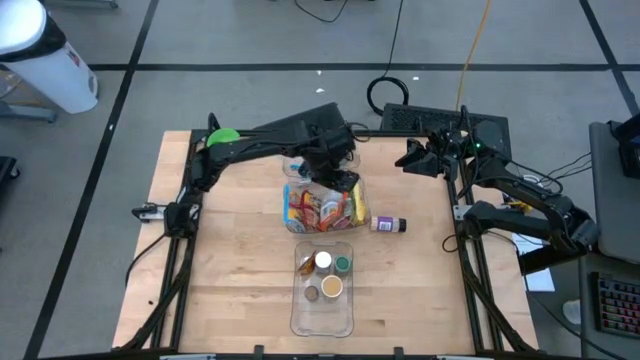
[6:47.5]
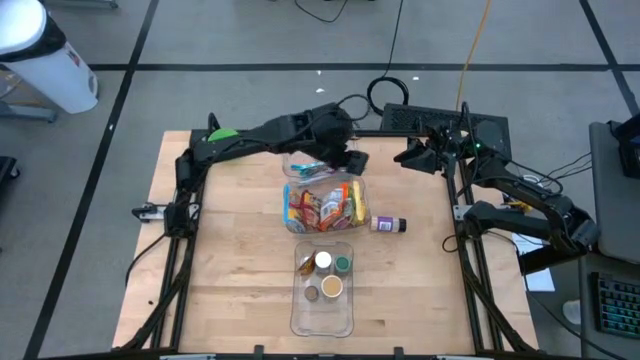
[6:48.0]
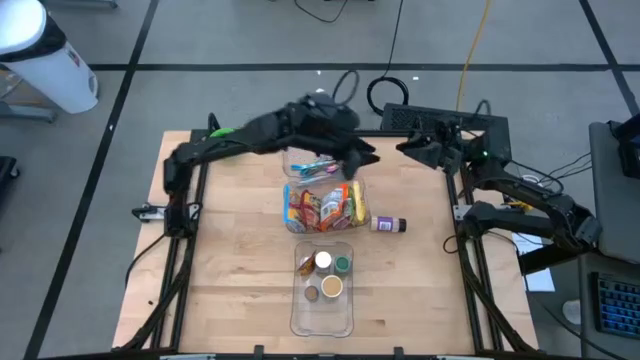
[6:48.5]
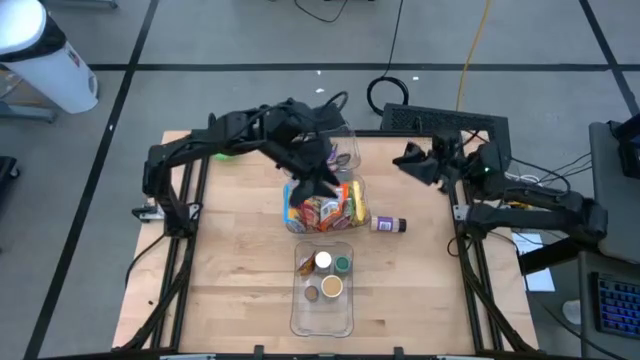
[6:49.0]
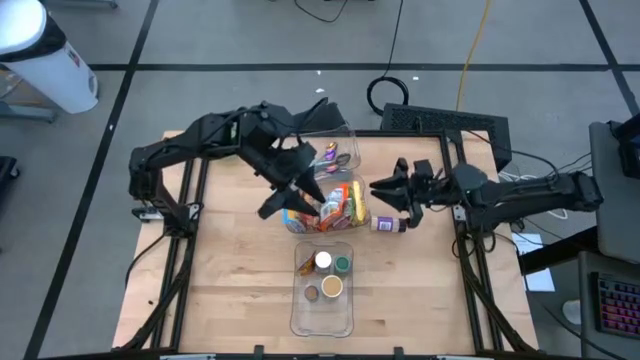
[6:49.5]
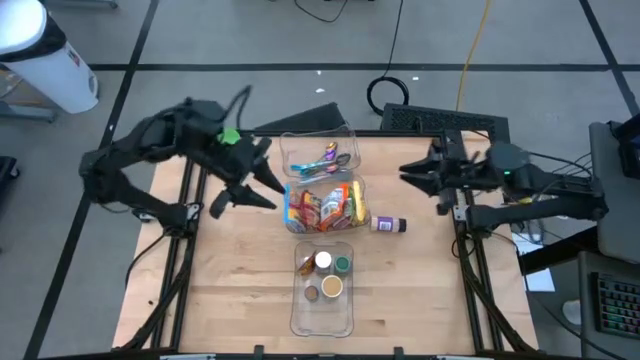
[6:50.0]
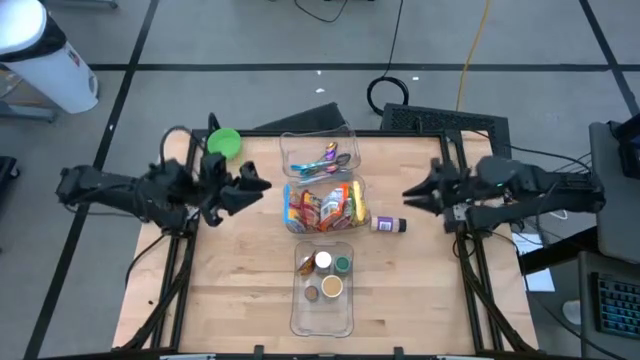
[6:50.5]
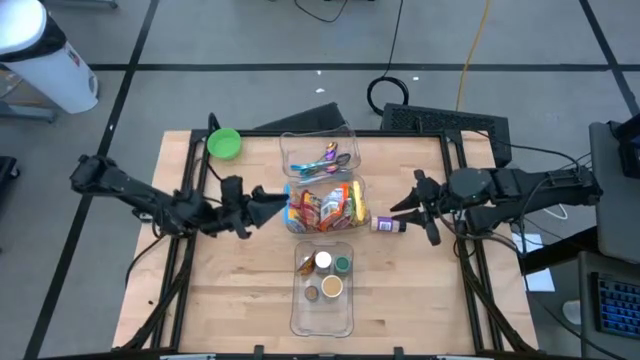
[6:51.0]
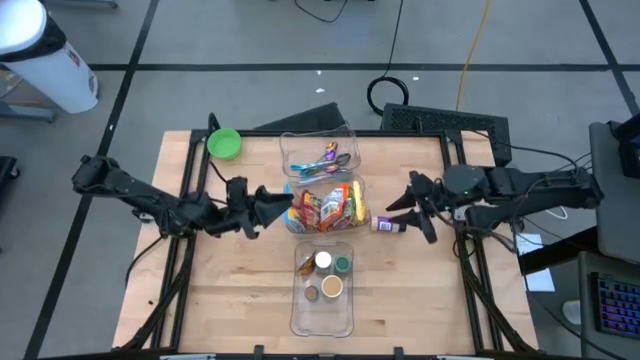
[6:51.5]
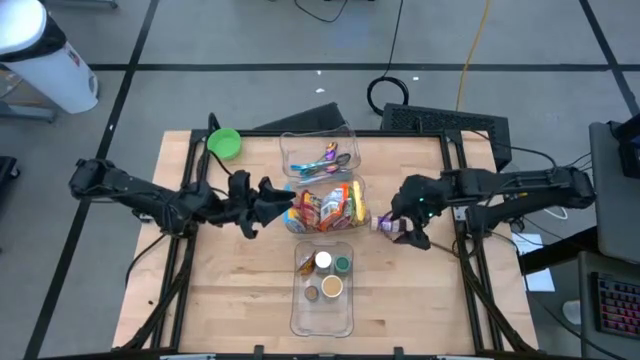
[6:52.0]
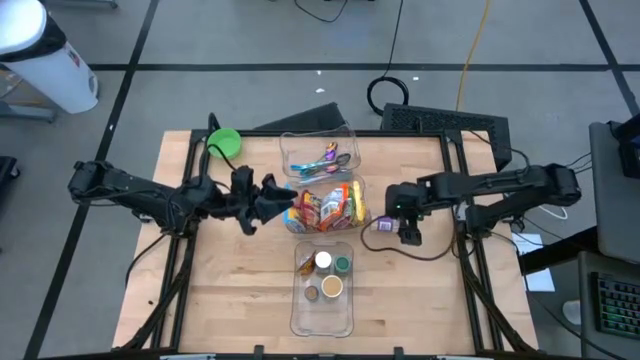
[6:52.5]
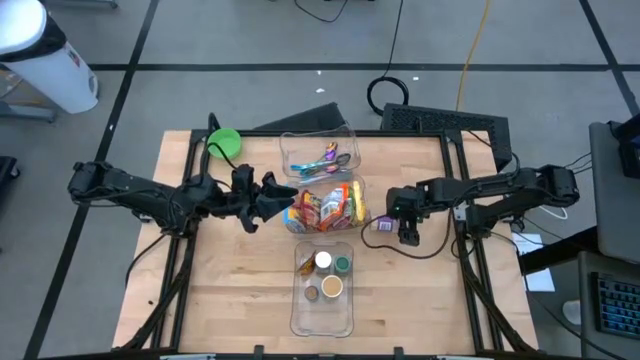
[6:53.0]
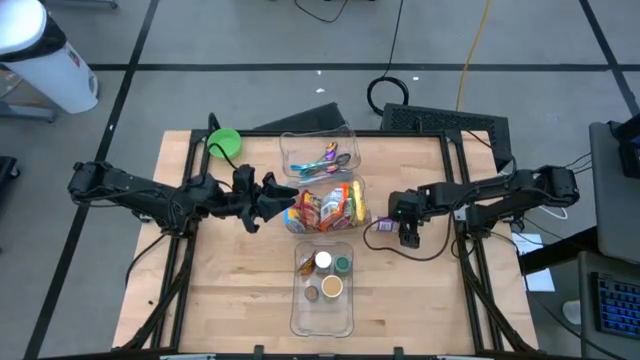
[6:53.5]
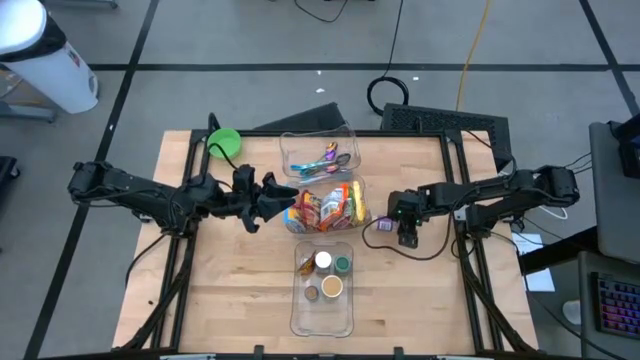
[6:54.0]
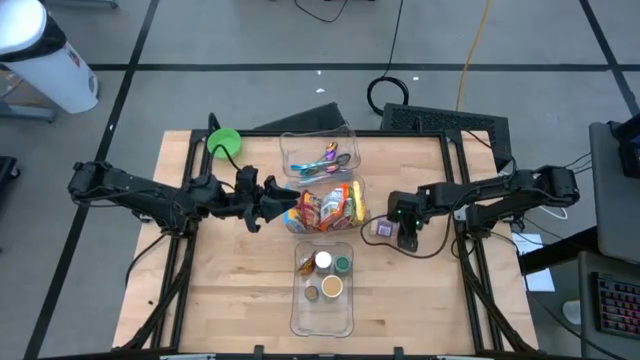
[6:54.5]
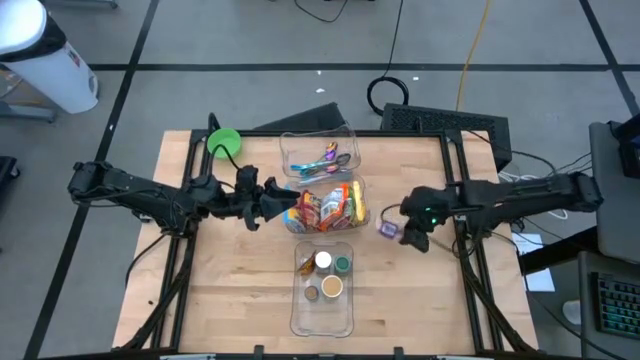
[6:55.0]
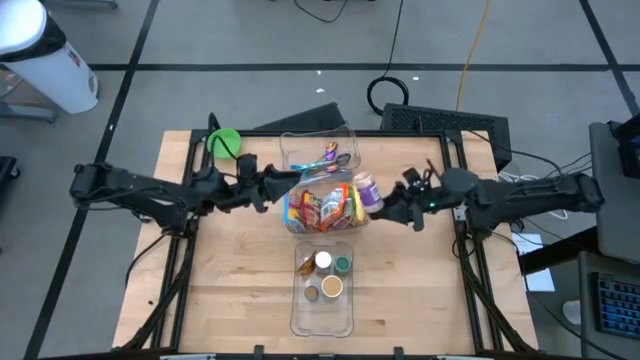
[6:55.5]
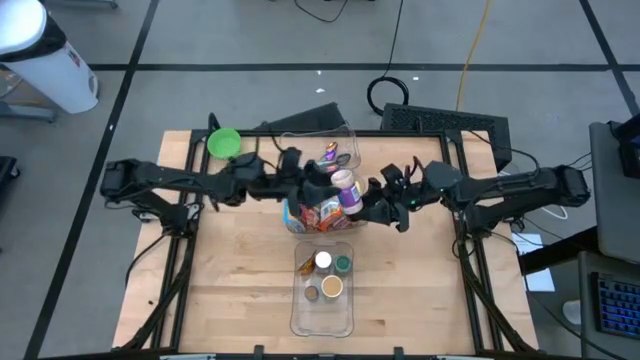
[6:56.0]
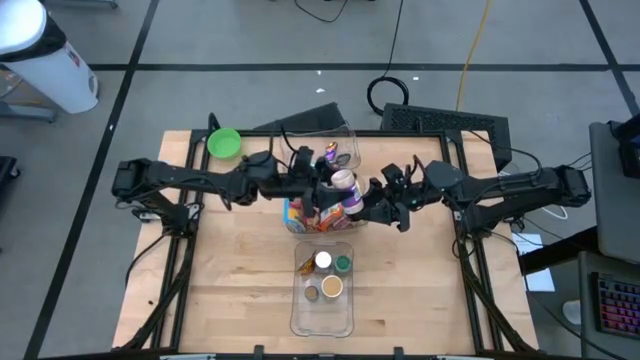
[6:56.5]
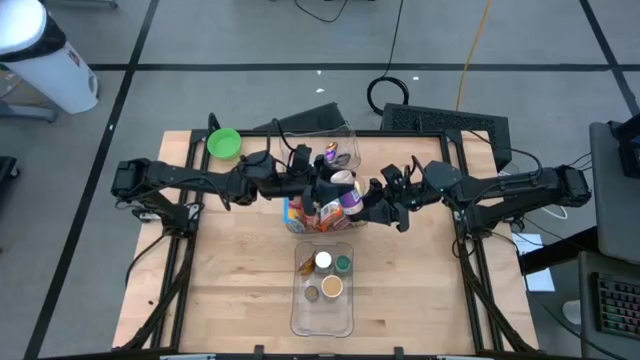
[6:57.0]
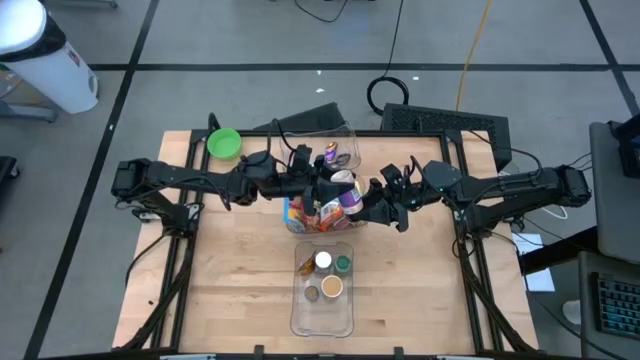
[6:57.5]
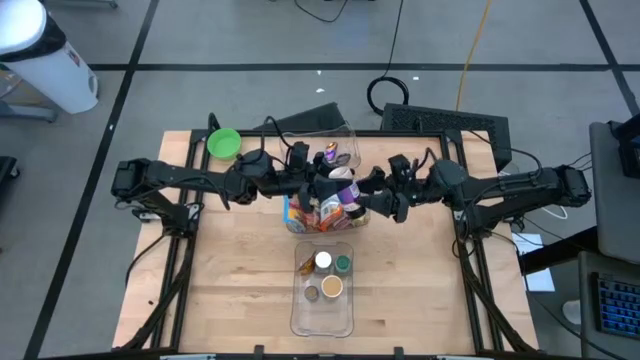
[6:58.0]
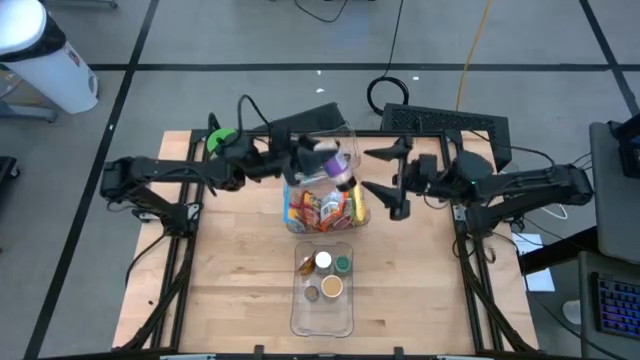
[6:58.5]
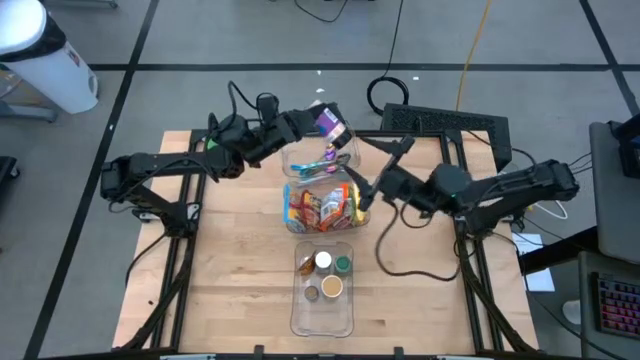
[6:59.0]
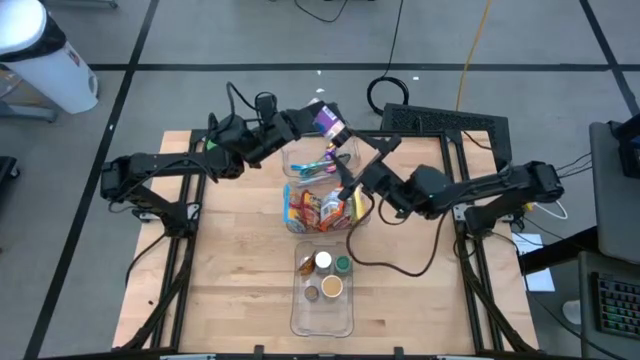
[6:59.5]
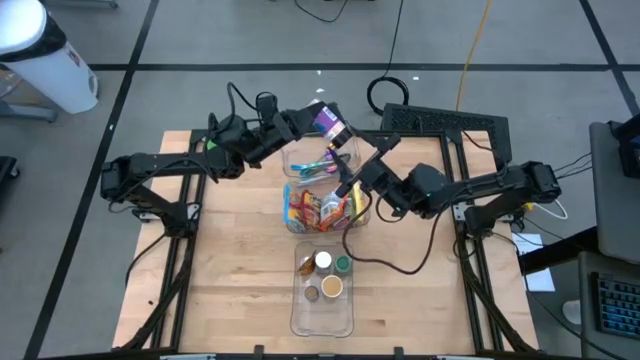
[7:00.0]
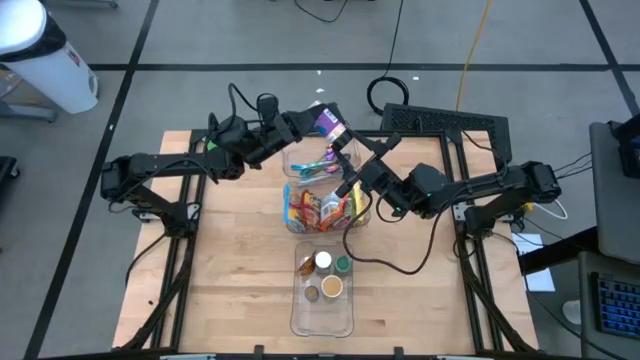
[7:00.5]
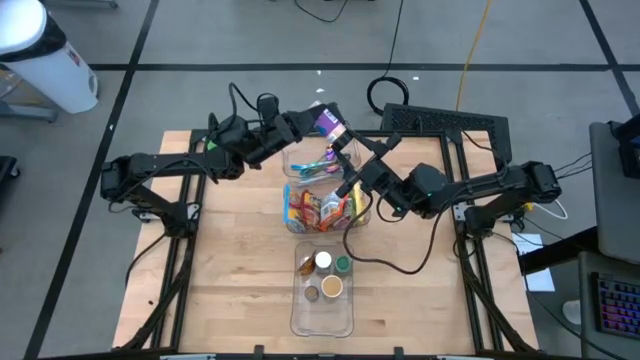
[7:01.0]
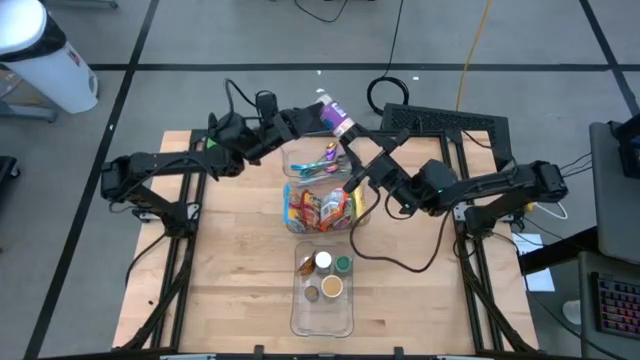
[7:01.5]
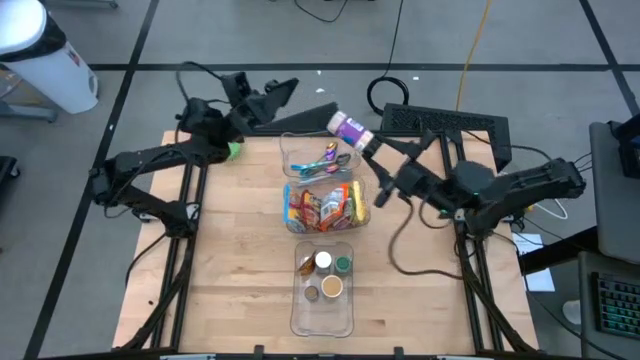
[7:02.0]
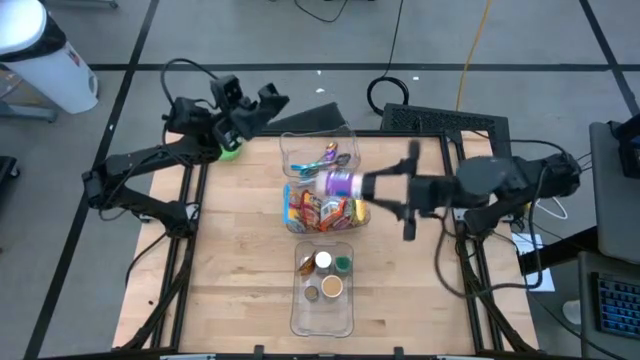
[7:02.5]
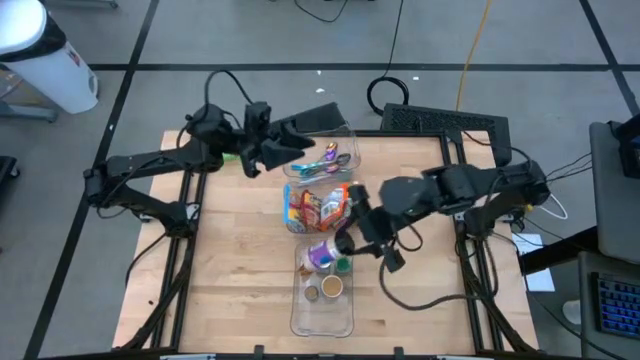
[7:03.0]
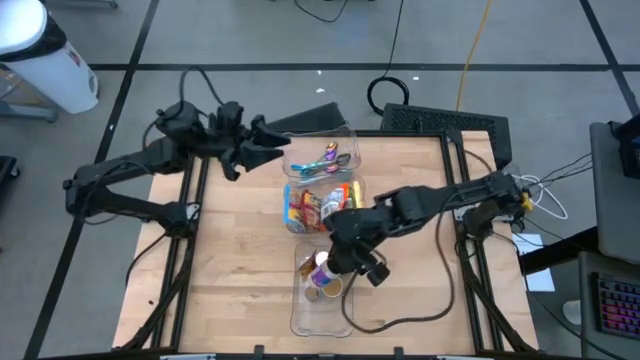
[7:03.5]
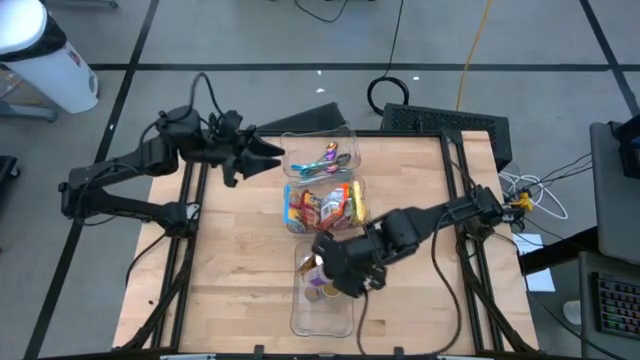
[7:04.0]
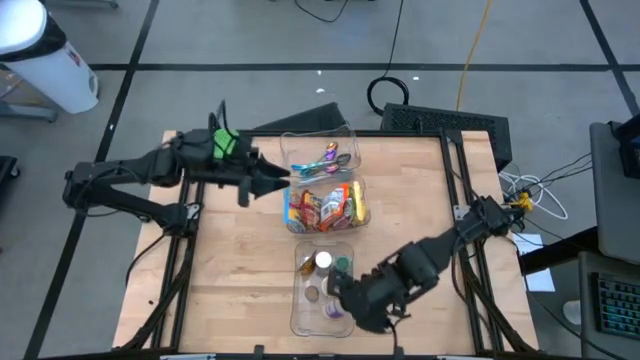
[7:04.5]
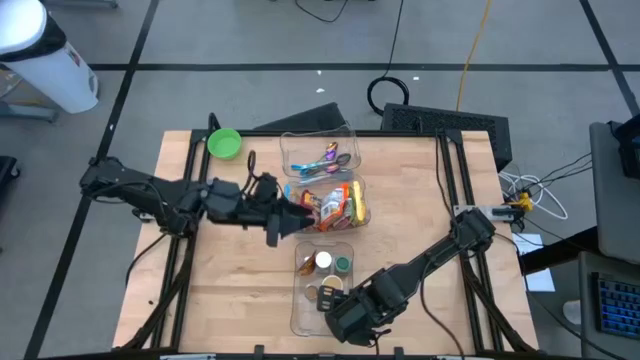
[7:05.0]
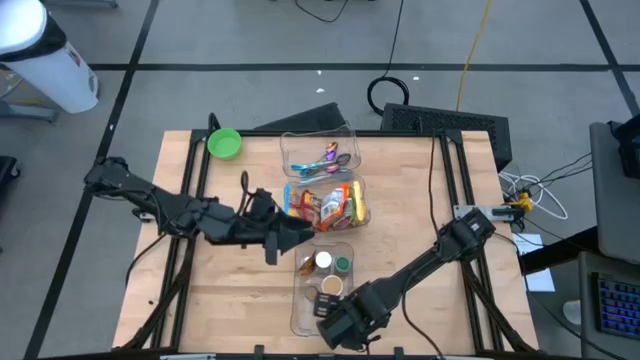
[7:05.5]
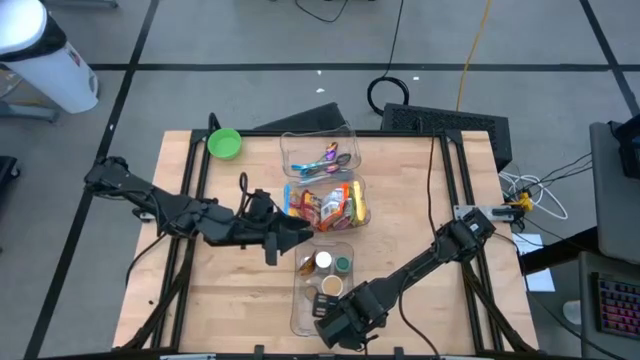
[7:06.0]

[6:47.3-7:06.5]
Task: Pick & Place Food Item
Put the black seasoning bottle into the bottom transparent bin

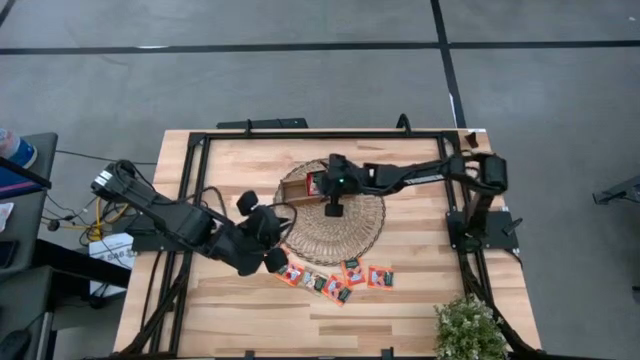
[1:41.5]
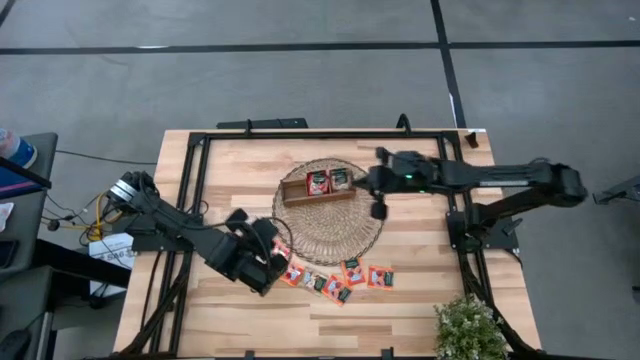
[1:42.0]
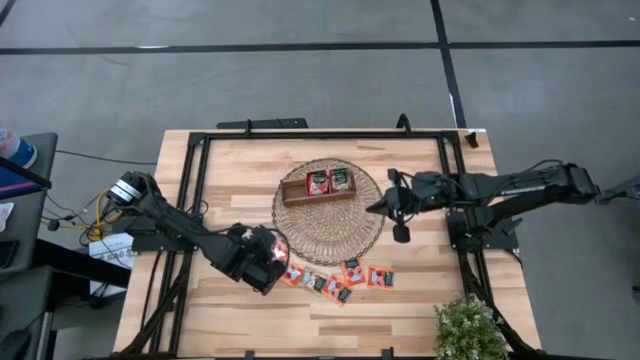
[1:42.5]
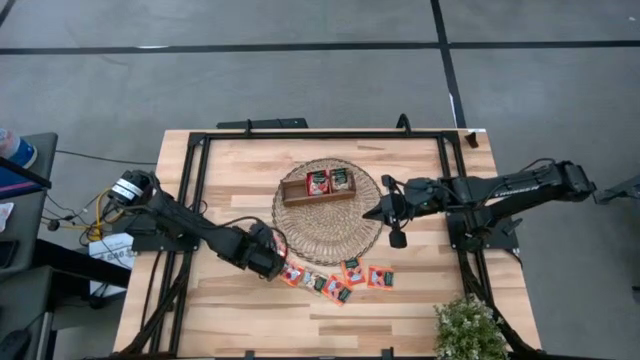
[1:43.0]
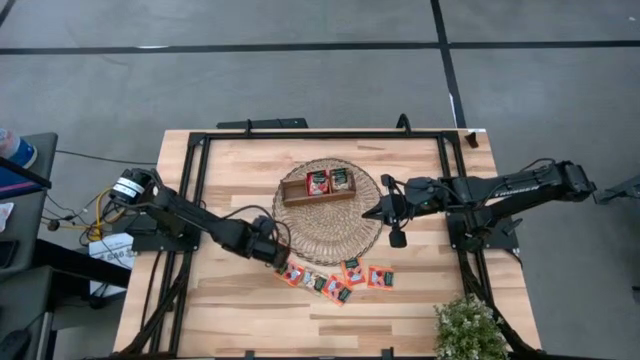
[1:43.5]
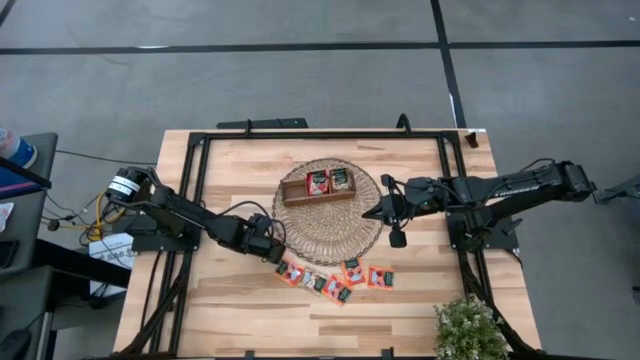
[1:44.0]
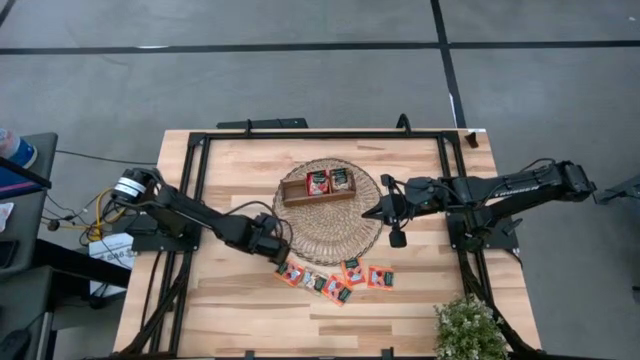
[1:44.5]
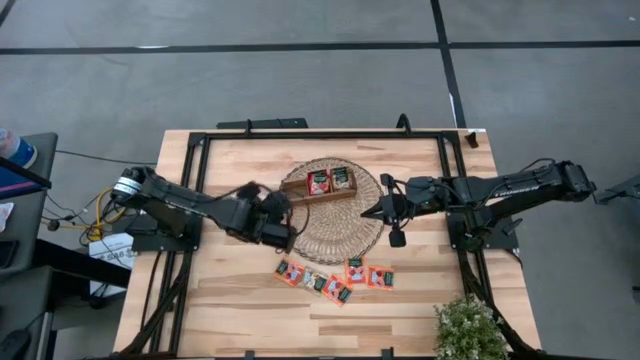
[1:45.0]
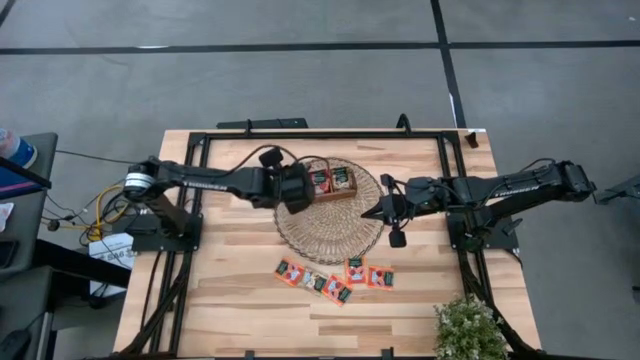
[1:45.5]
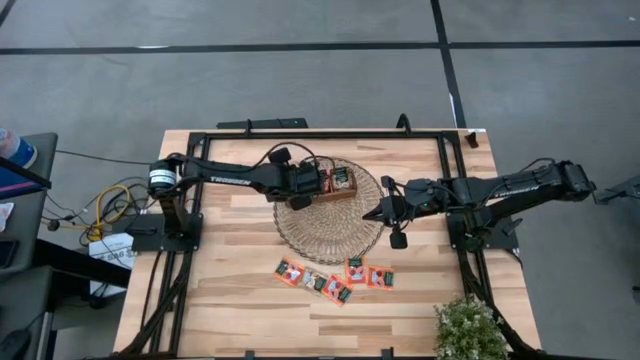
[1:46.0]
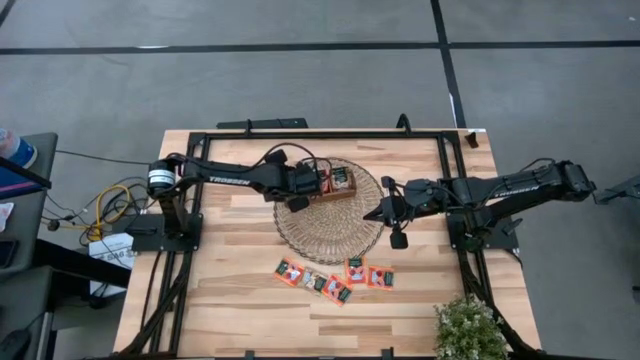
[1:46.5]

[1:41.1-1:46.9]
Task: Pick & Place Tea
Put the orange tea bag into the left side of the wooden organizer
